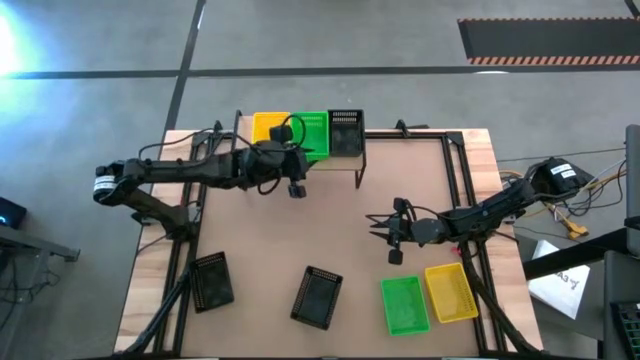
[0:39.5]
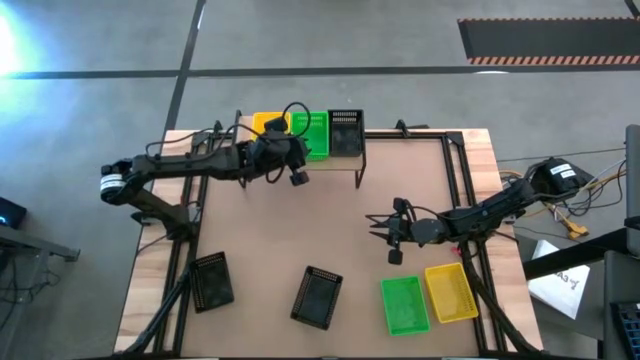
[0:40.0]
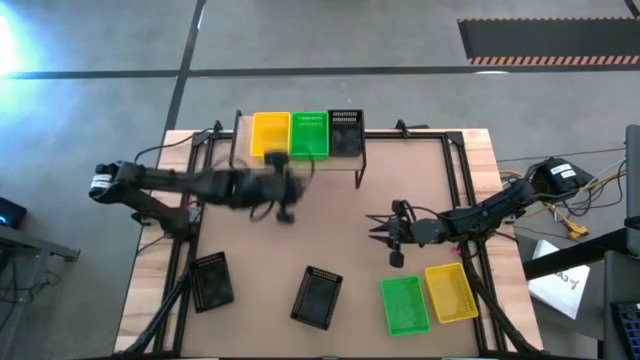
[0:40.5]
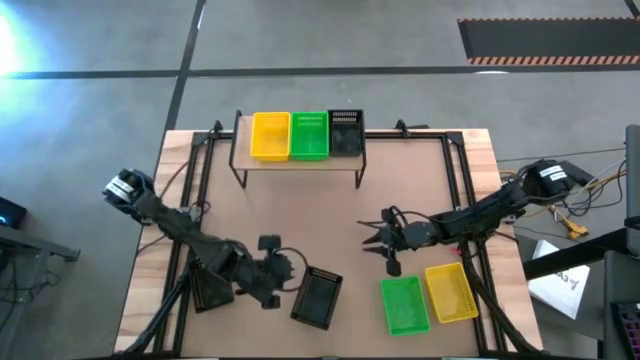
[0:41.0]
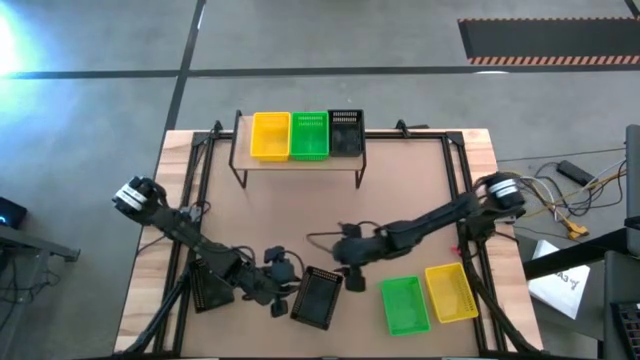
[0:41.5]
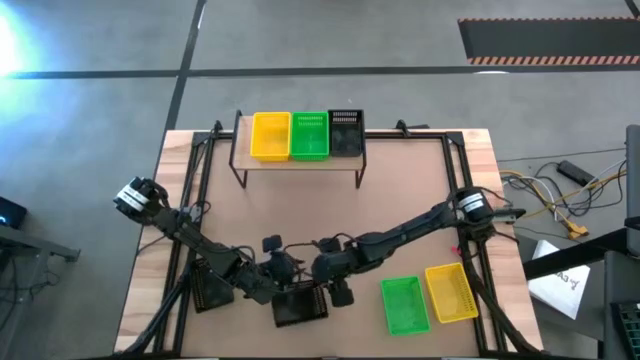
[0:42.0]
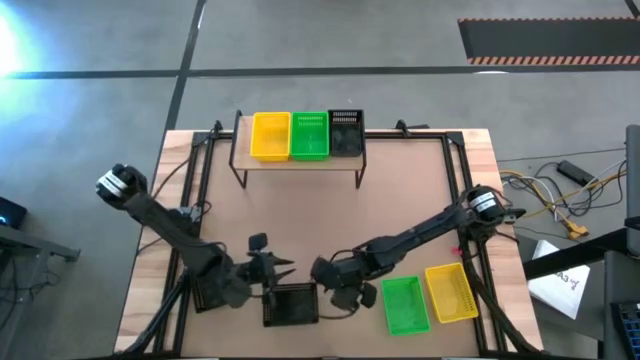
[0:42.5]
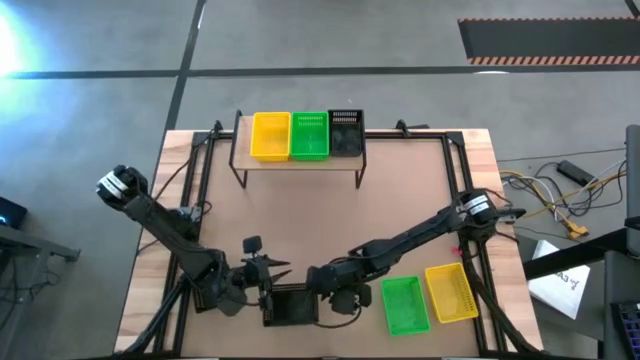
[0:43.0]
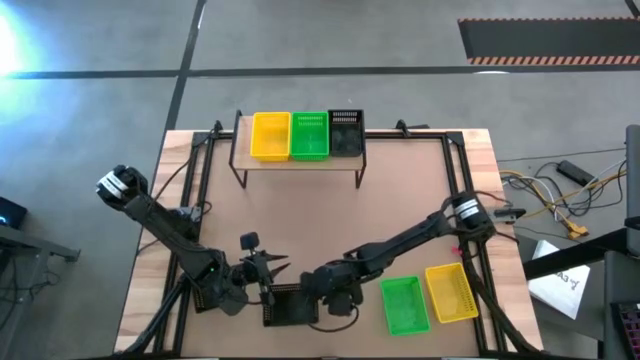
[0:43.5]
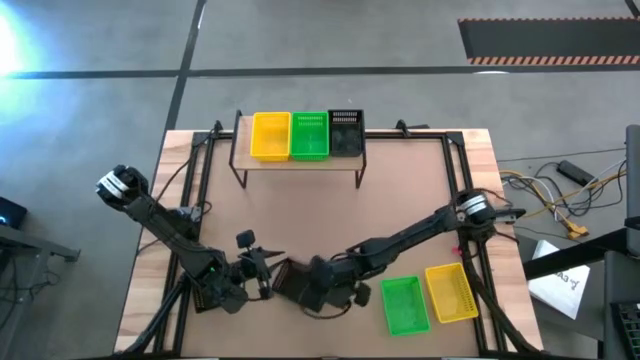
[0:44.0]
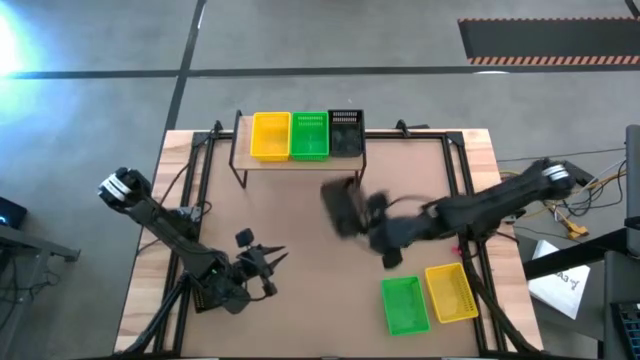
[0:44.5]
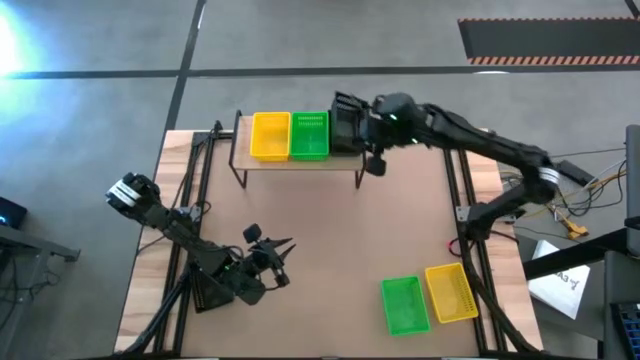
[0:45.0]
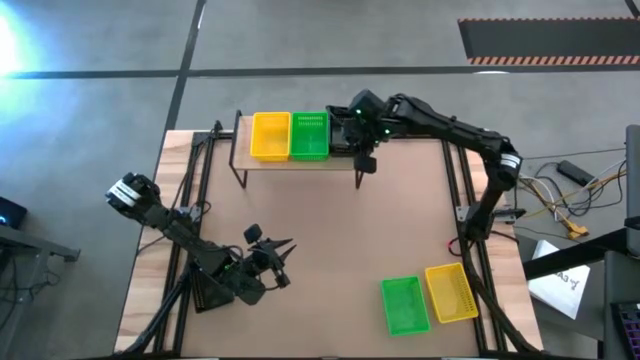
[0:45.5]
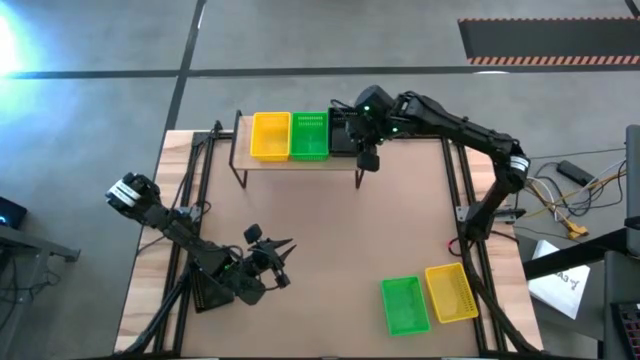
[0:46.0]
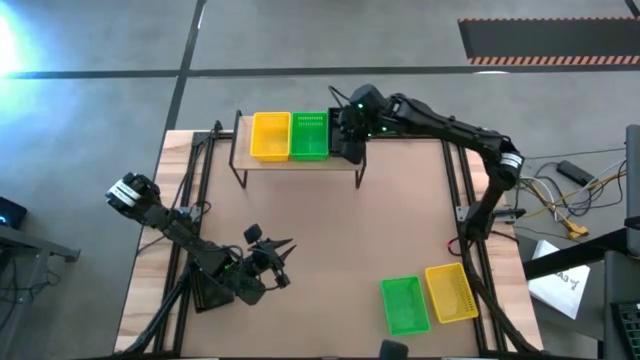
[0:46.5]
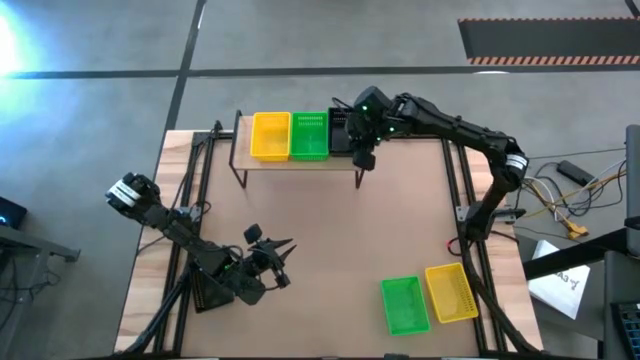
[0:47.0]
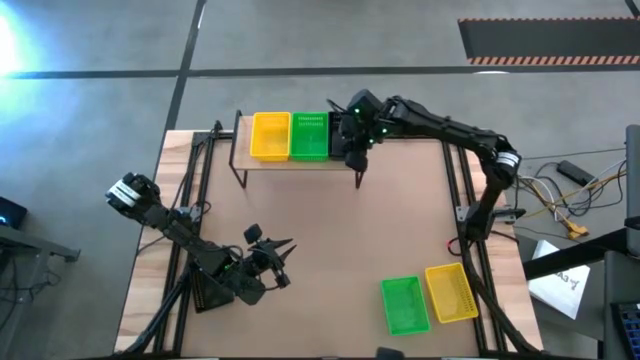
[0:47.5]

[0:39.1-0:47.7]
Task: Stack baskets on shelf by color
Stack the right black basket on the other black basket on the shelf

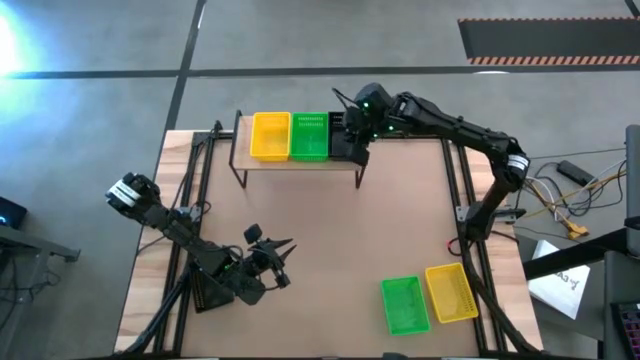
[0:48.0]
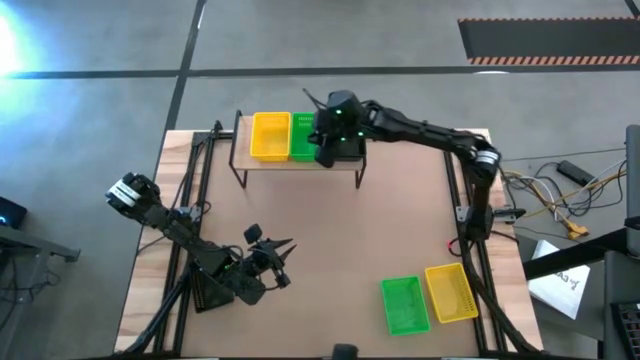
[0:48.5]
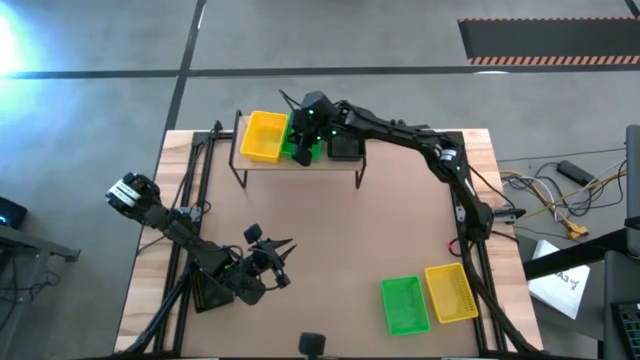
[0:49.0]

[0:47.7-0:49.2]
Adjust the green baskets on the shelf

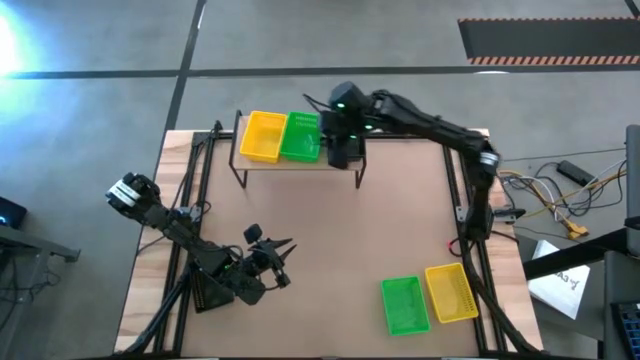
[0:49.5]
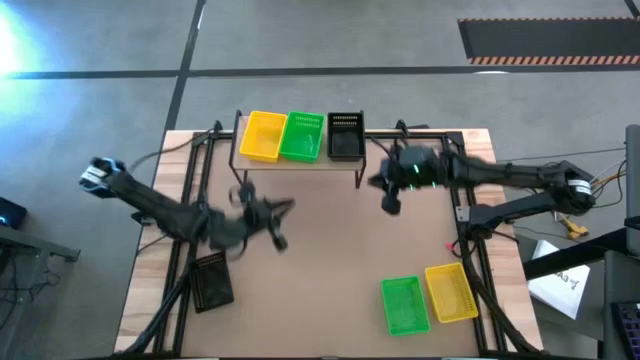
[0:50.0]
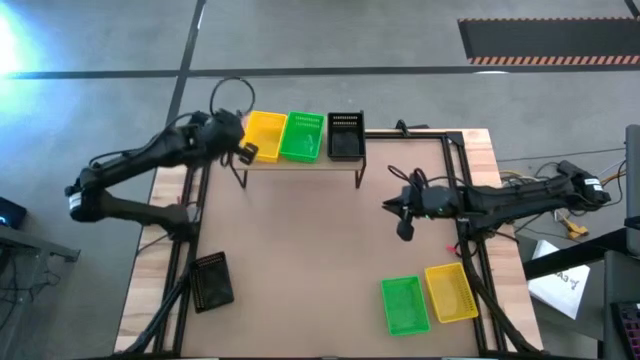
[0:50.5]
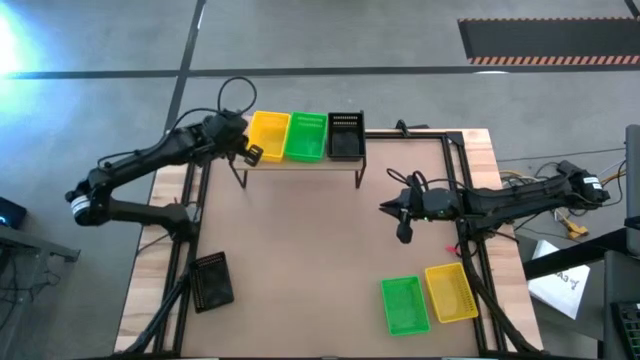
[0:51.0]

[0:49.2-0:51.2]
Adjust the yellow baskets on the shelf

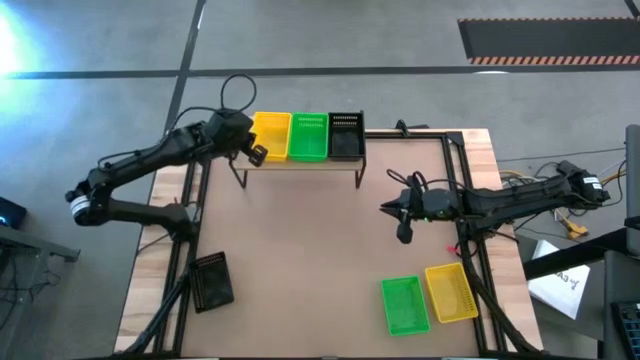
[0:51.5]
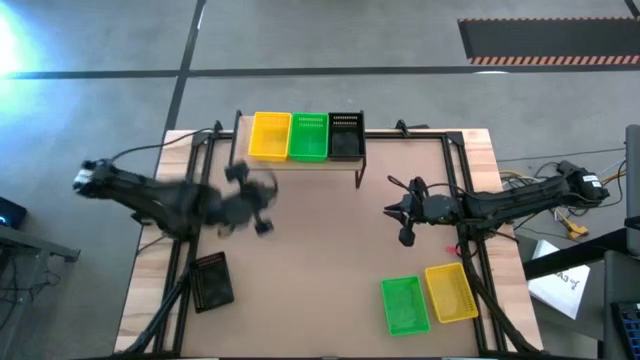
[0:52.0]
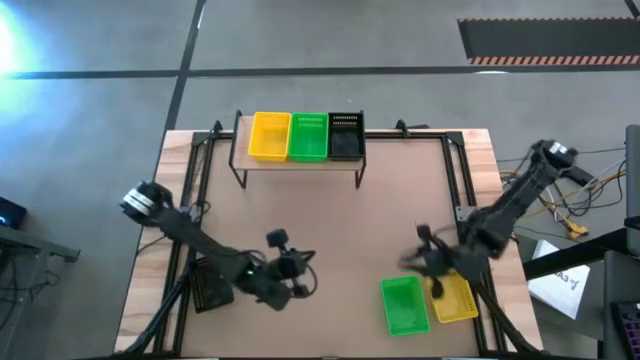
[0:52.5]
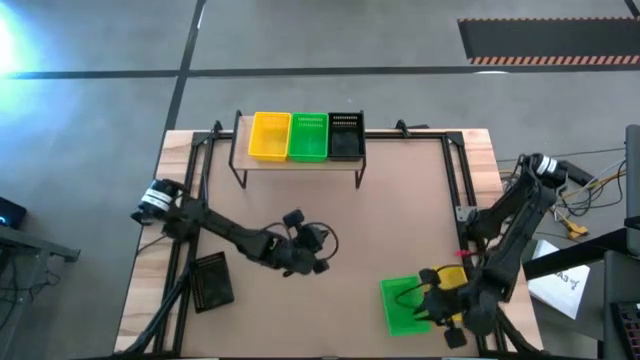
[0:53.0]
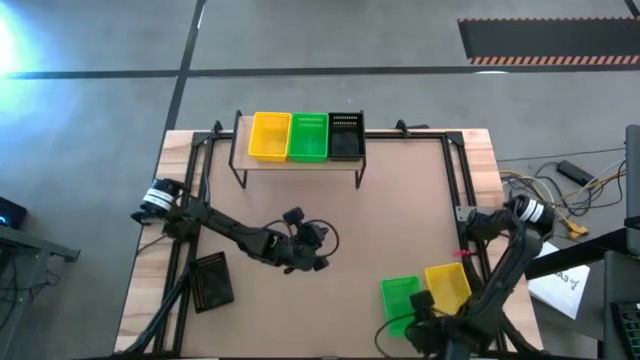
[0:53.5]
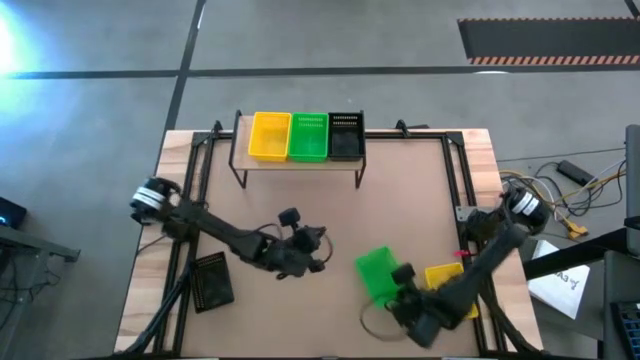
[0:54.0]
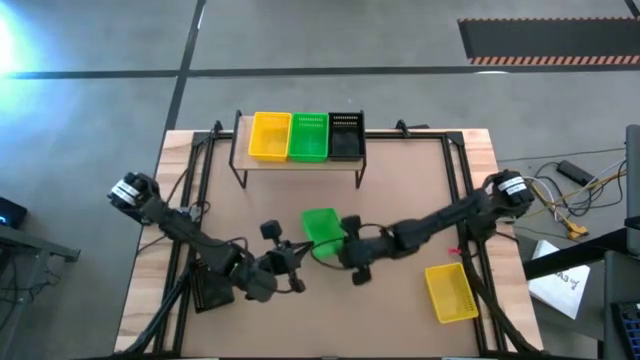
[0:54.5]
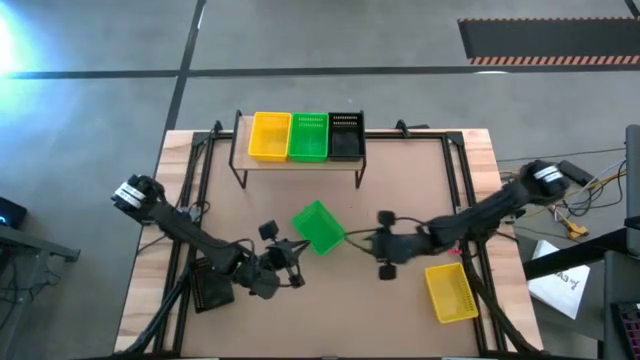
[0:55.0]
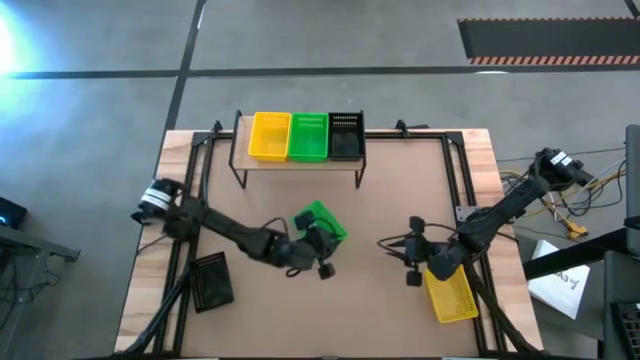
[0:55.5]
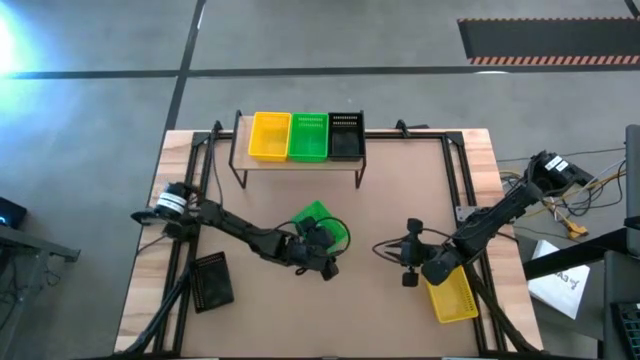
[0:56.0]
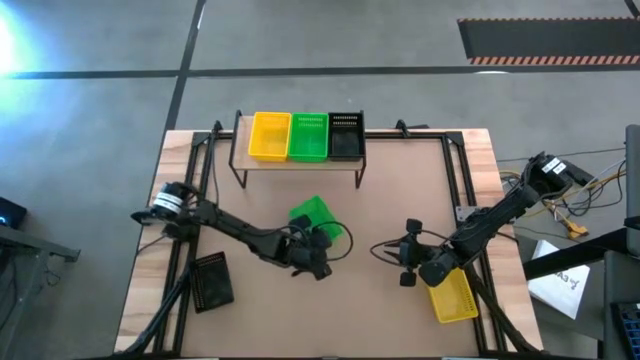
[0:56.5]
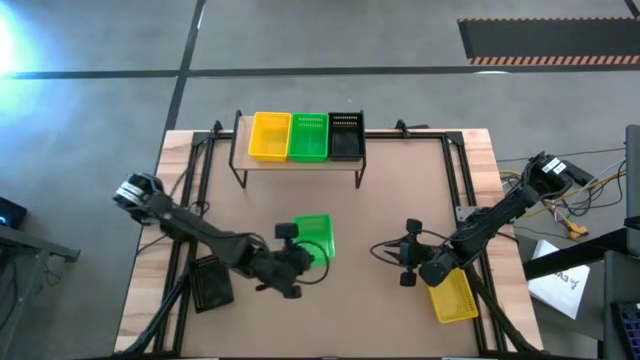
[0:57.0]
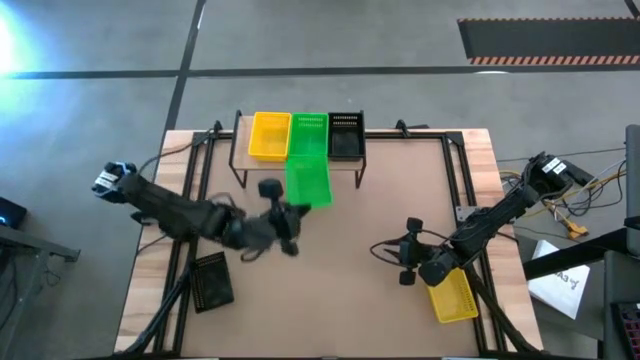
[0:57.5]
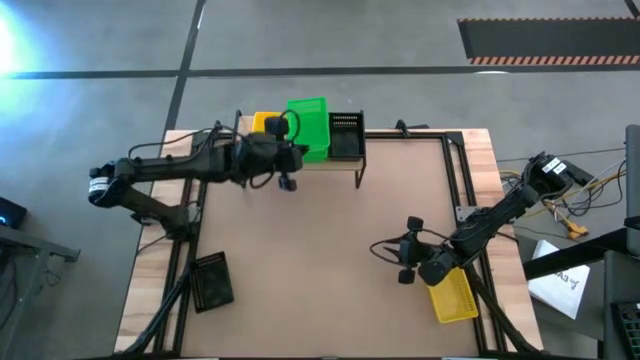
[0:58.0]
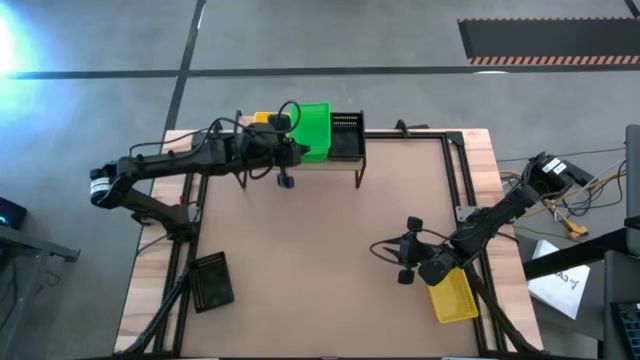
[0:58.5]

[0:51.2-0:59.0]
Stack the green basket on the other green basket on the shelf
